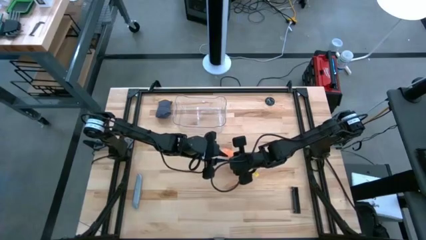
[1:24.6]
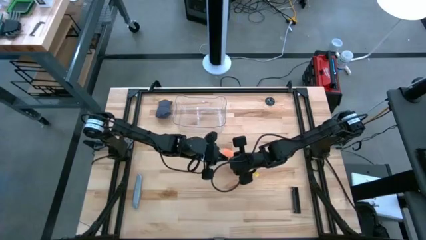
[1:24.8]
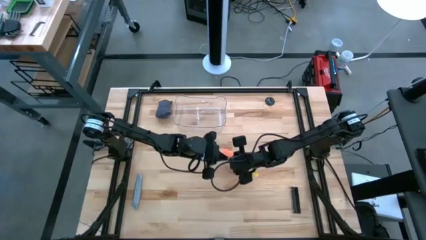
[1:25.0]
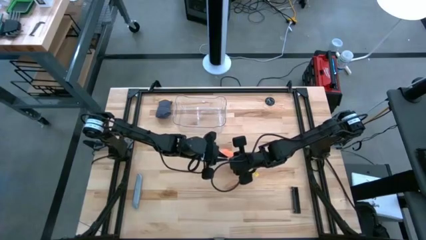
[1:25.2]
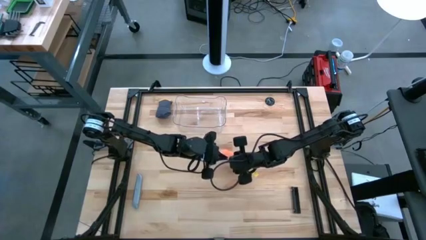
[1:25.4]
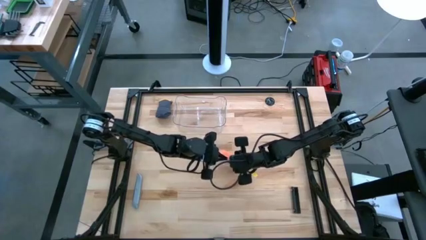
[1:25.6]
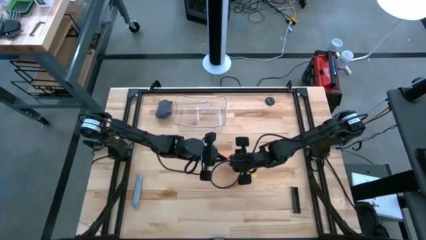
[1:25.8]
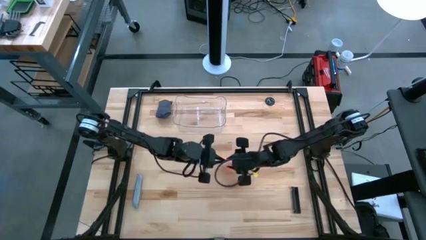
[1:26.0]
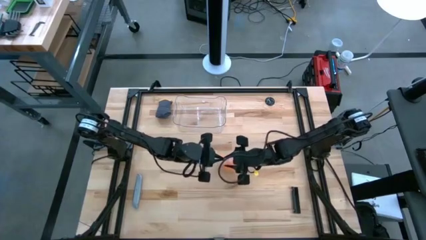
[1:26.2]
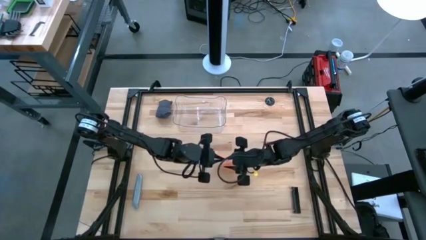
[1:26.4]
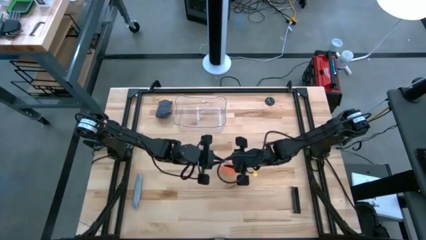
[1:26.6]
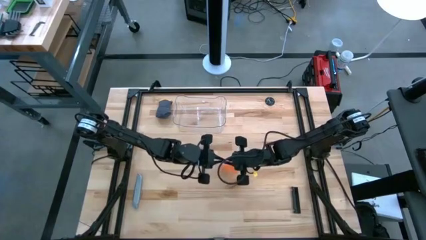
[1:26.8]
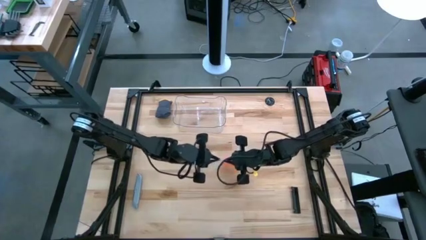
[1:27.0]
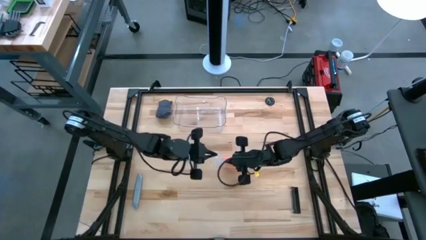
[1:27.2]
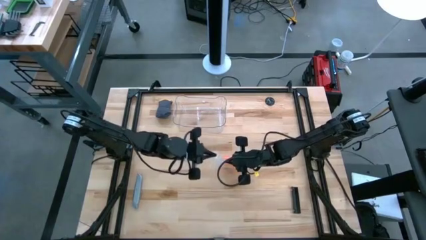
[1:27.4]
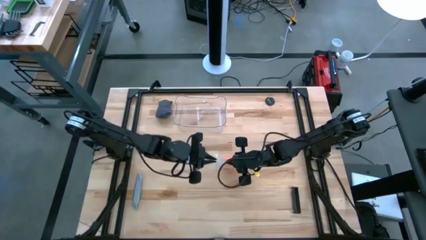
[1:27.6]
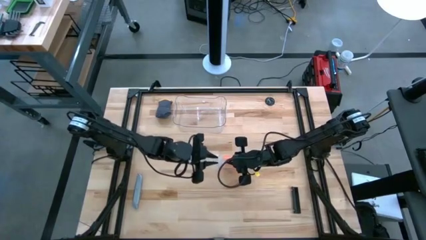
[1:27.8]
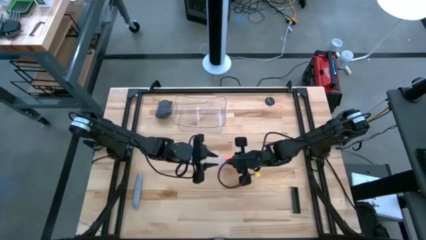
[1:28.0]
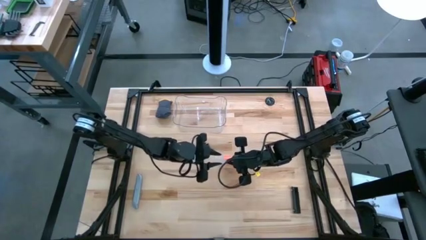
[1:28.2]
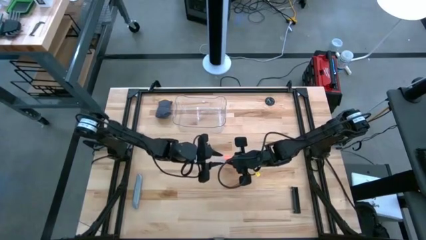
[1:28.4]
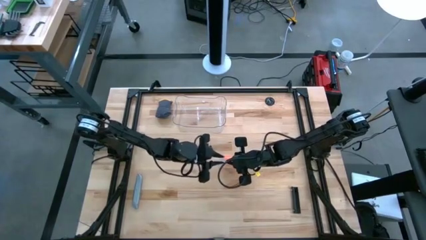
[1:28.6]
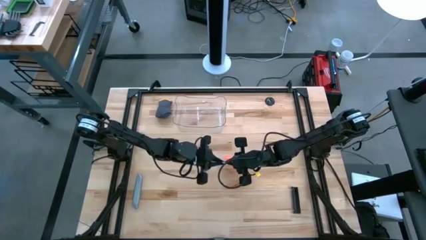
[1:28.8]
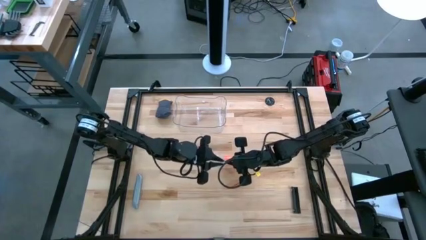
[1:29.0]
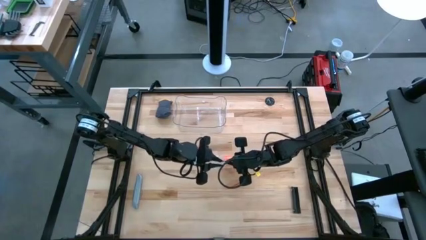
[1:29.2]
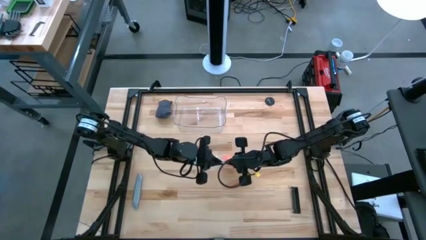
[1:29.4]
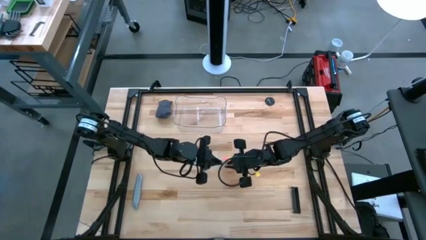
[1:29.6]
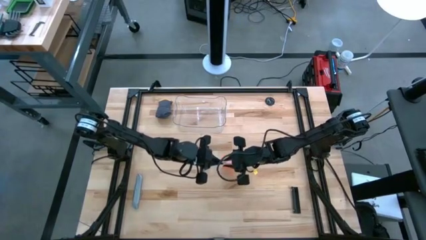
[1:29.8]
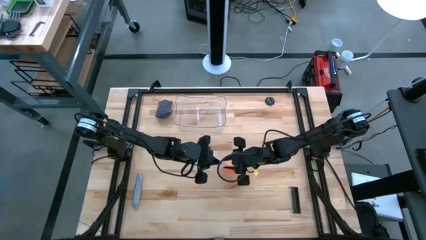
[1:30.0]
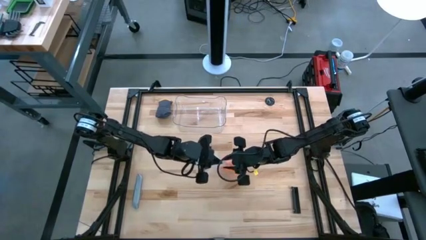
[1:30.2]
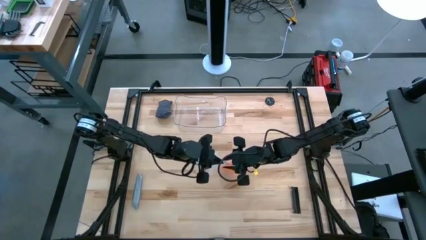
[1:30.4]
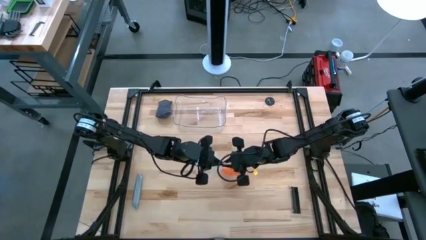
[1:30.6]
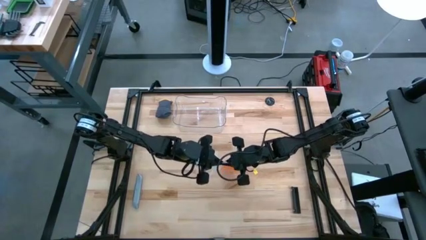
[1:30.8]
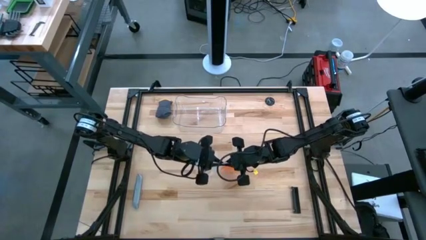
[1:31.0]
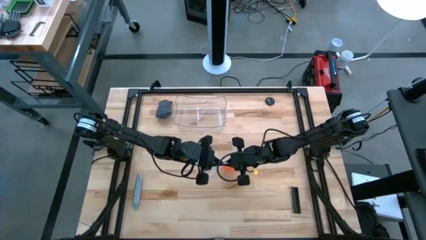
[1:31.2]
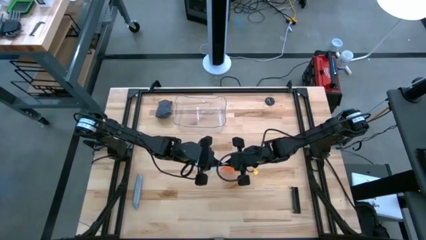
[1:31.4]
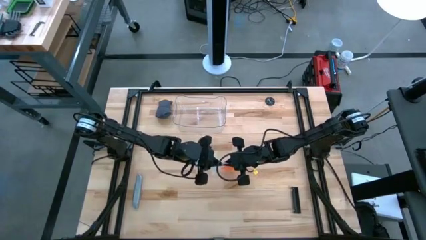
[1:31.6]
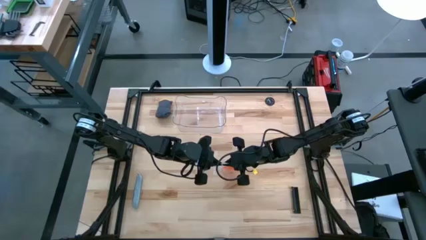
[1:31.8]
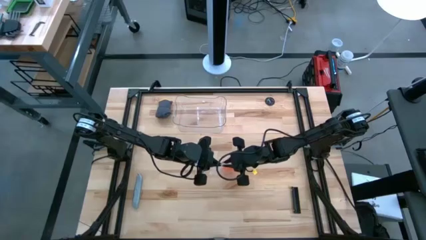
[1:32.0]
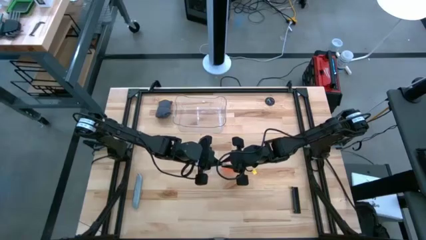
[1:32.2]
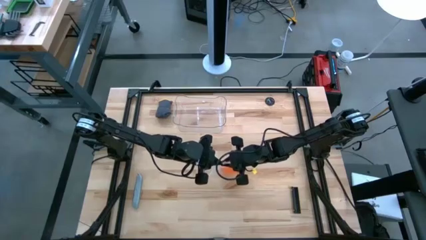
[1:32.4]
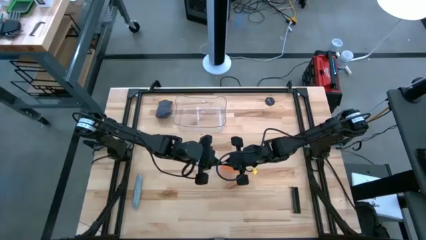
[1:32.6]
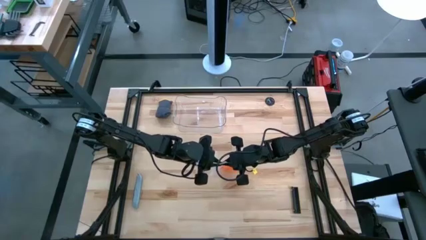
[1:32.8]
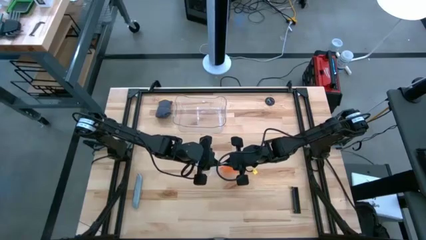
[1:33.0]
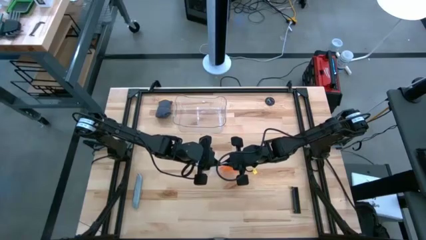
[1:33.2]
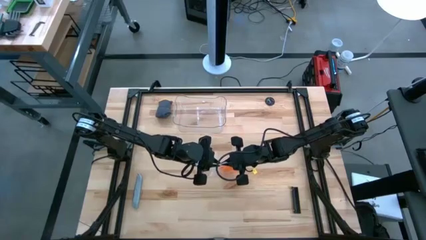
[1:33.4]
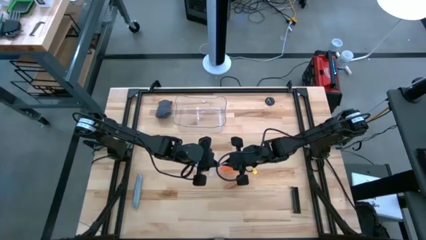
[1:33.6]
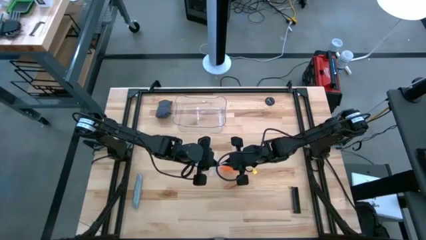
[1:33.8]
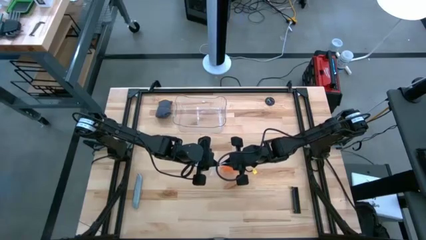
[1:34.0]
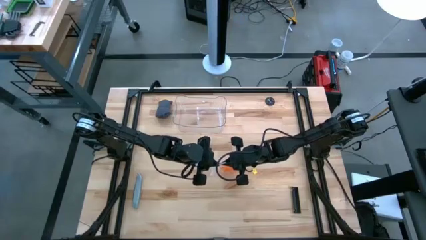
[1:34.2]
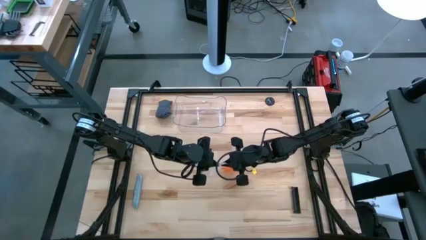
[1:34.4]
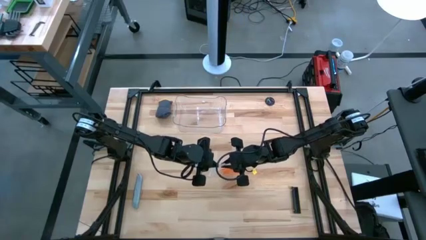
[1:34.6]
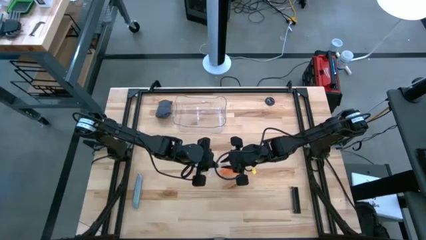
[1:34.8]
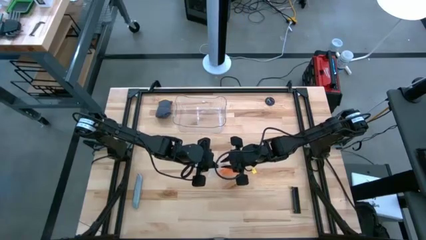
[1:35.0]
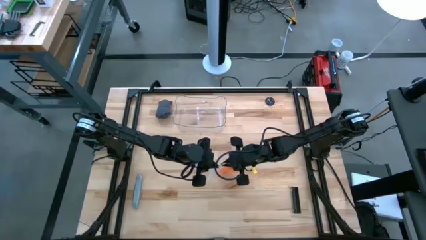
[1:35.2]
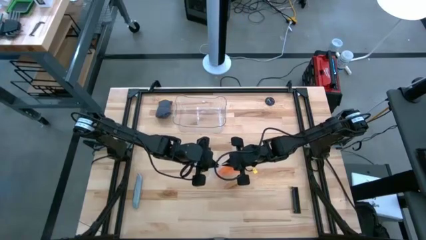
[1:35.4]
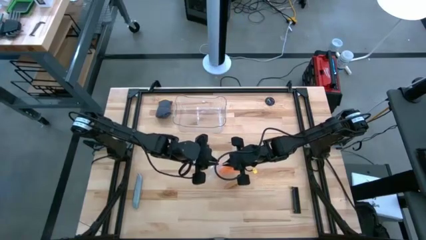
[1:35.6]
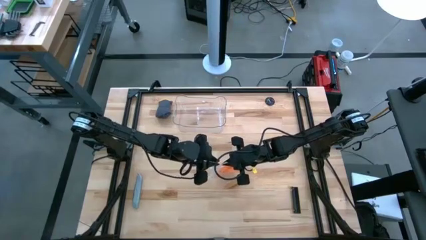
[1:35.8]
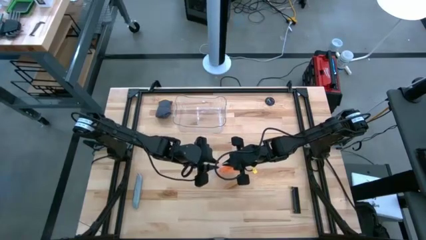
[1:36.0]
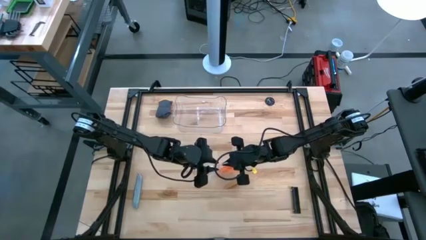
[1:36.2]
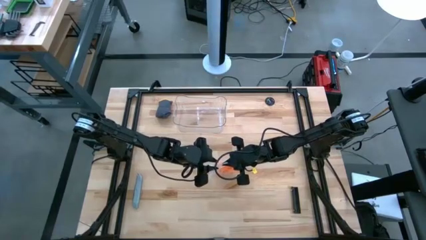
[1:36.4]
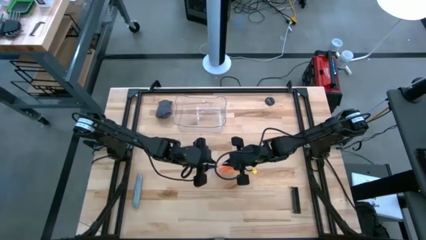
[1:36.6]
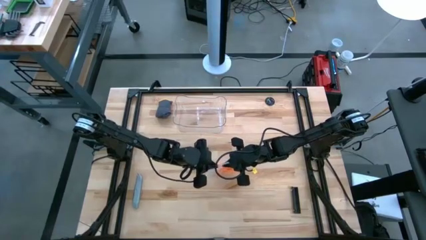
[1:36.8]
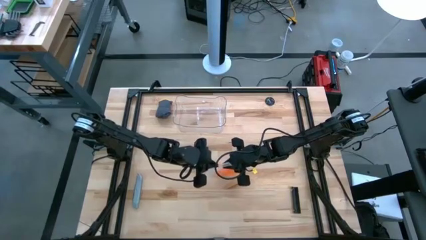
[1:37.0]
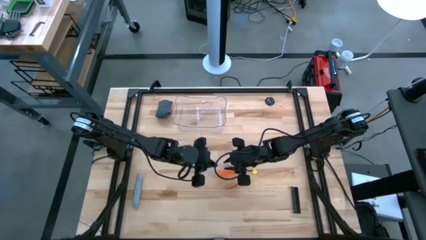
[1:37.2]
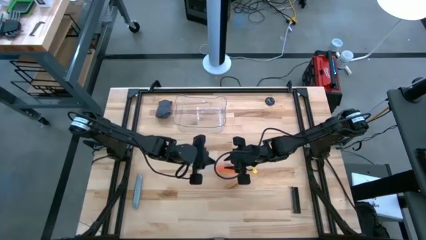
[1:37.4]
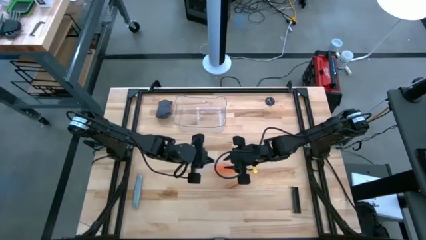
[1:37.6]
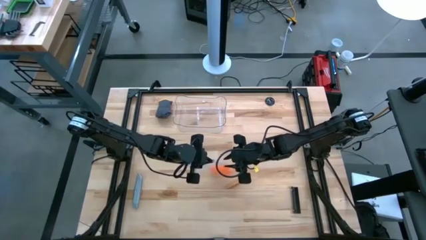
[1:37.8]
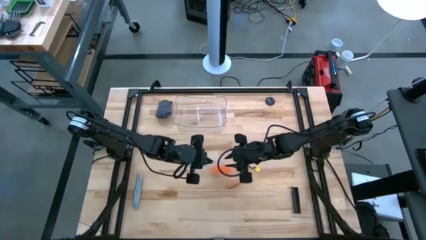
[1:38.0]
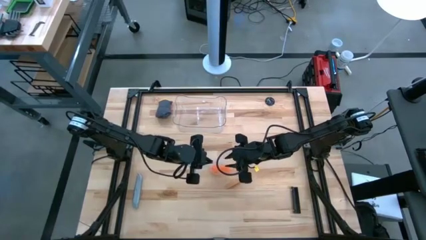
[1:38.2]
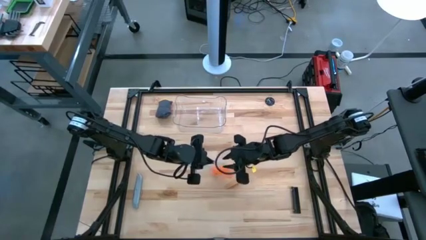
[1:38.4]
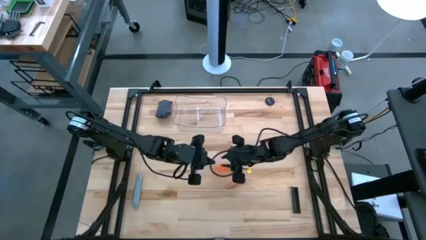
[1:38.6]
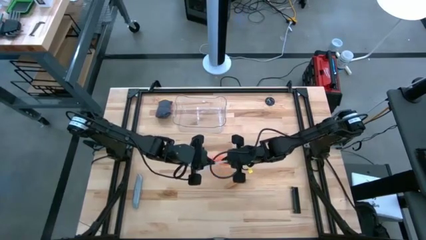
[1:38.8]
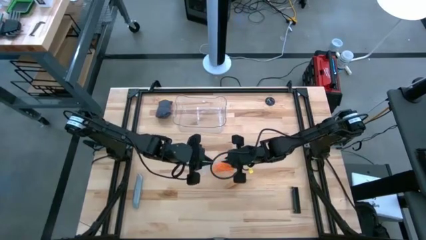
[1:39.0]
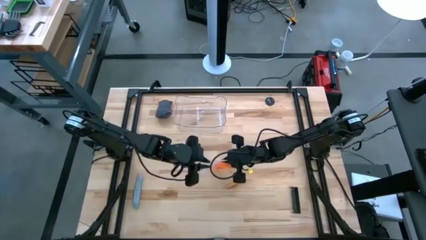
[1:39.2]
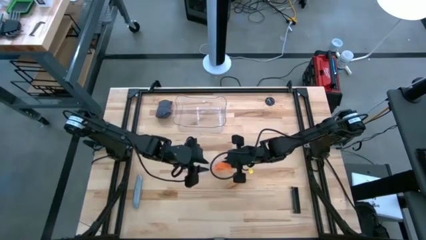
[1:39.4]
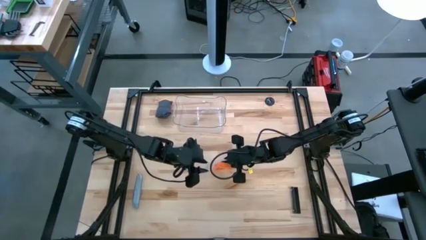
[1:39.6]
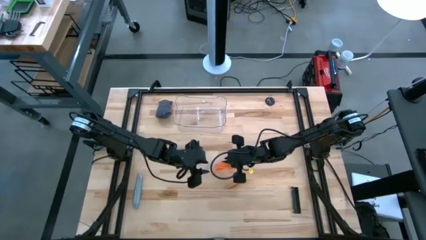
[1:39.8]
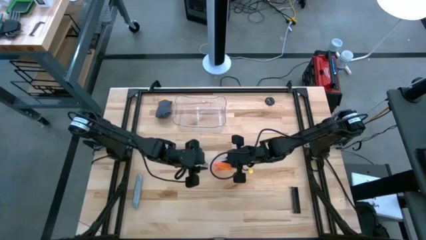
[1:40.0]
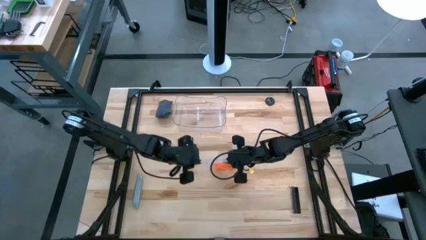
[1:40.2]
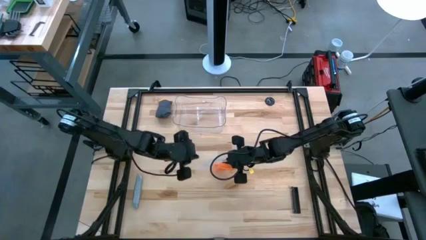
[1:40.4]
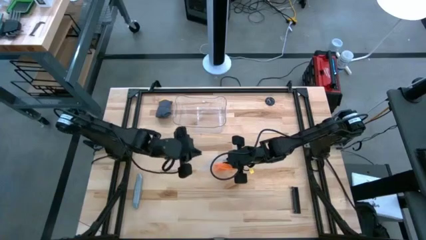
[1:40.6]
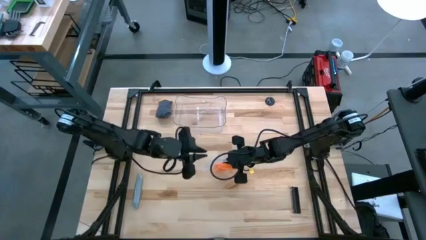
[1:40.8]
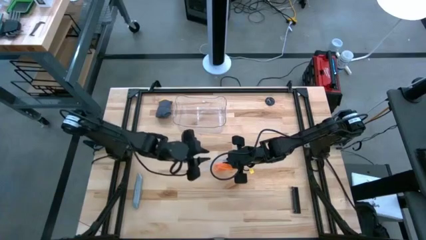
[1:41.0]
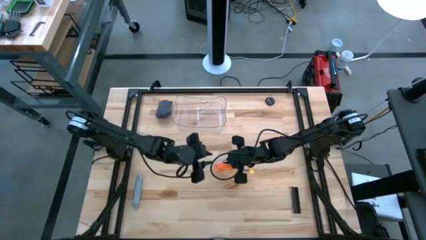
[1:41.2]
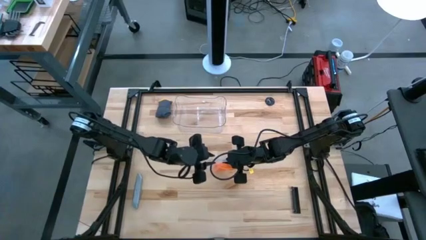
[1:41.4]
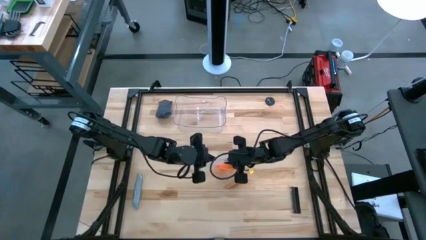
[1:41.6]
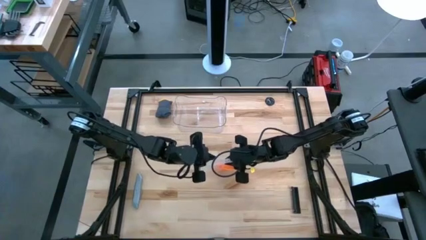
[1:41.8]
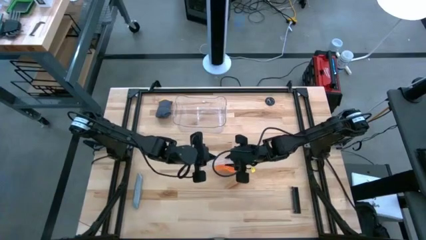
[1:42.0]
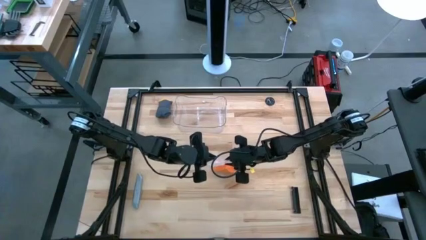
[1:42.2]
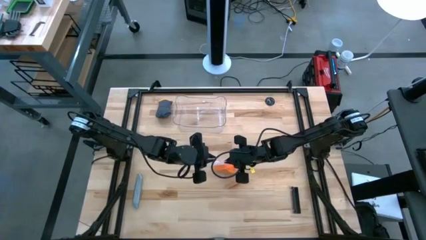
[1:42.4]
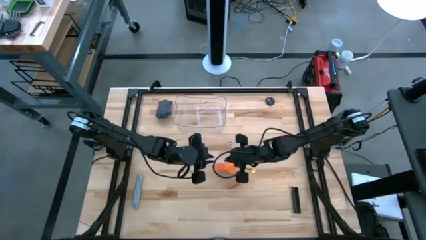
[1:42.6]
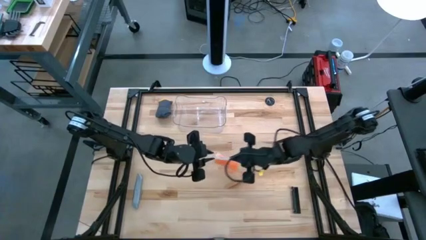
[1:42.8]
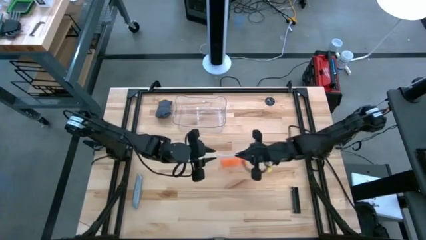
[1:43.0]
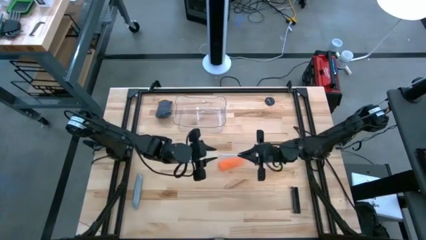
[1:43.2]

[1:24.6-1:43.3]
Task: Roll bandage
Put the zip bag into the transparent bin
